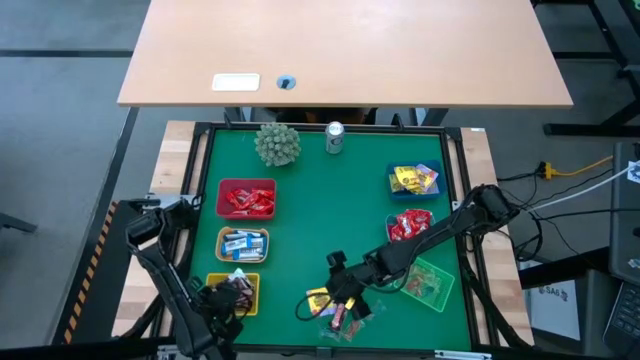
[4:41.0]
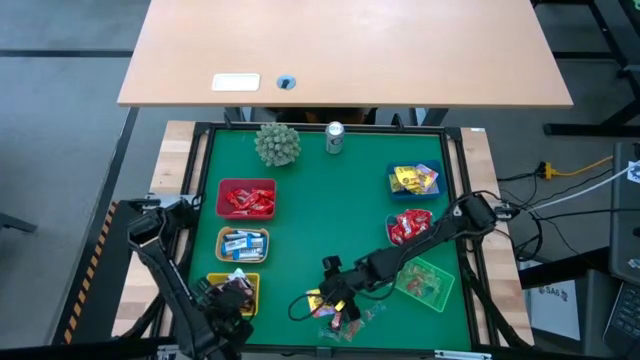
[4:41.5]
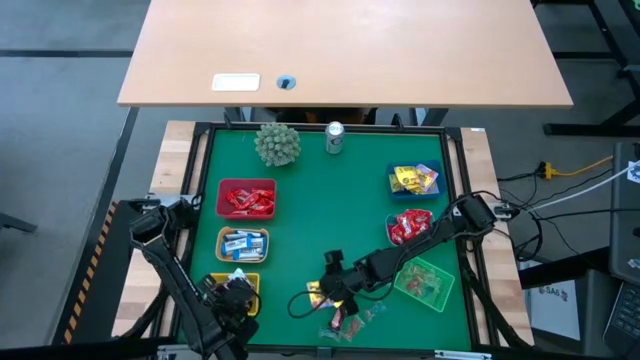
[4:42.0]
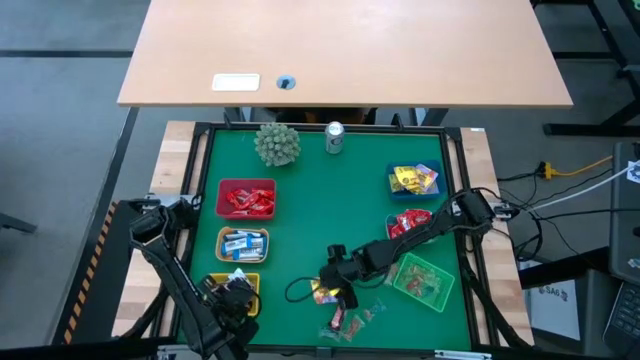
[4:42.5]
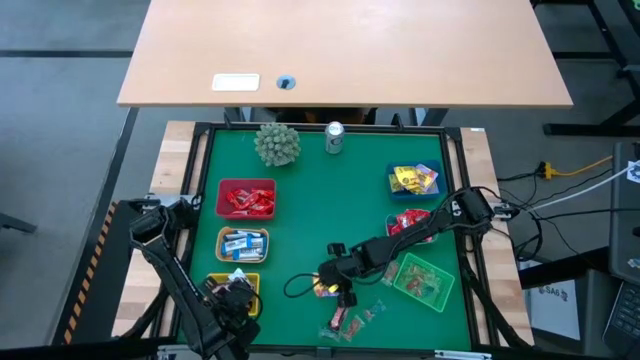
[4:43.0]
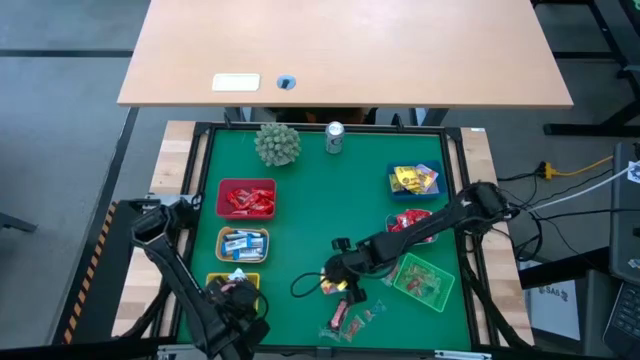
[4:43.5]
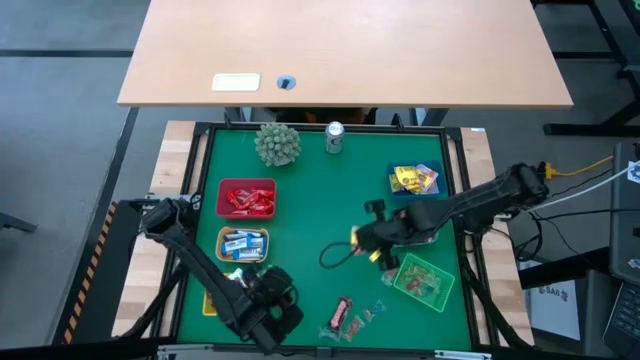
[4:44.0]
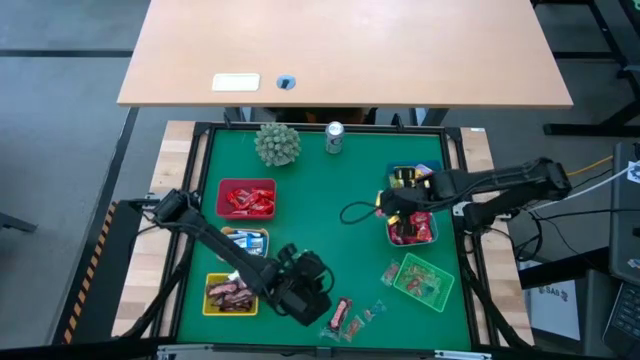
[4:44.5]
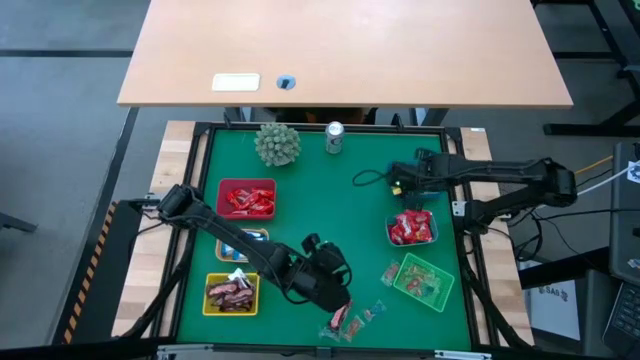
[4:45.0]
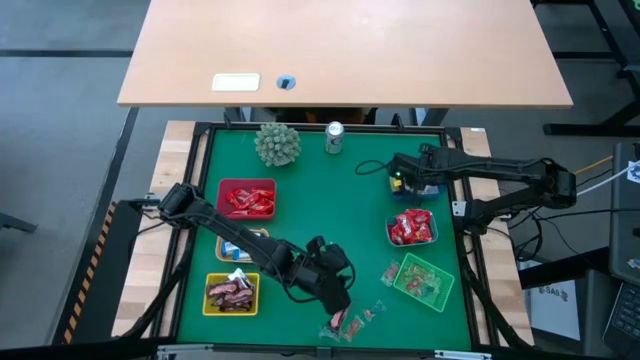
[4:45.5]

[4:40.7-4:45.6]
Task: Sort candy
Put the yellow candy into the dark blue bin

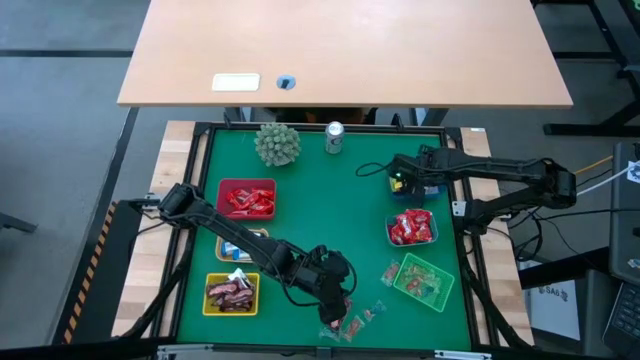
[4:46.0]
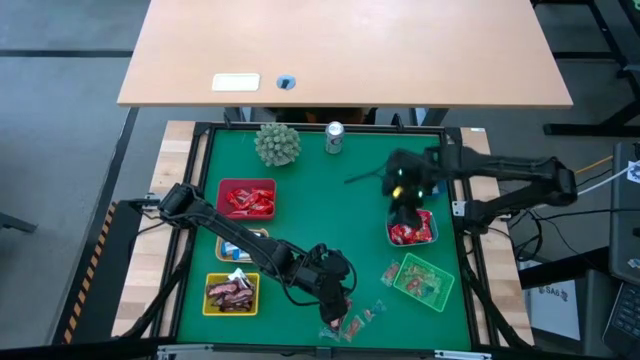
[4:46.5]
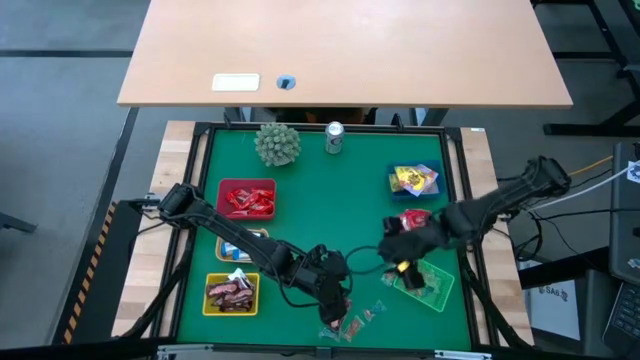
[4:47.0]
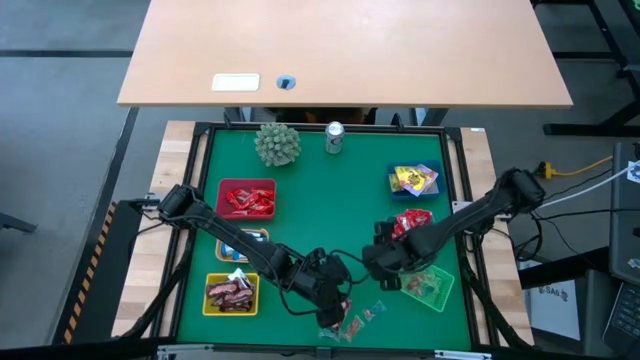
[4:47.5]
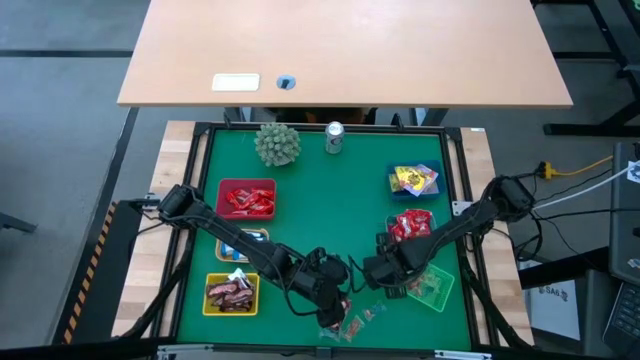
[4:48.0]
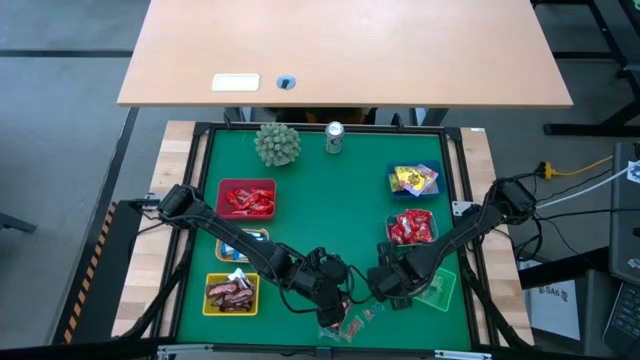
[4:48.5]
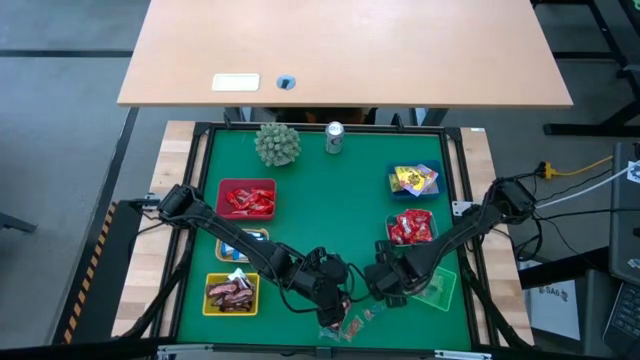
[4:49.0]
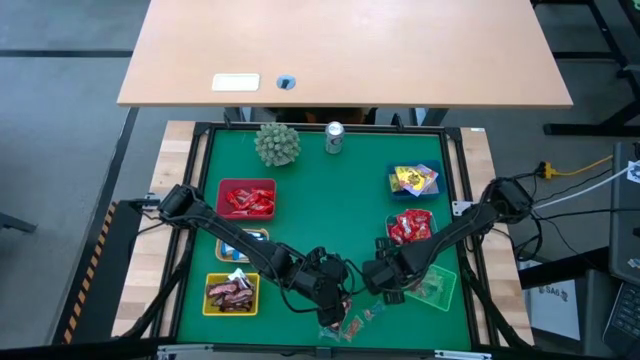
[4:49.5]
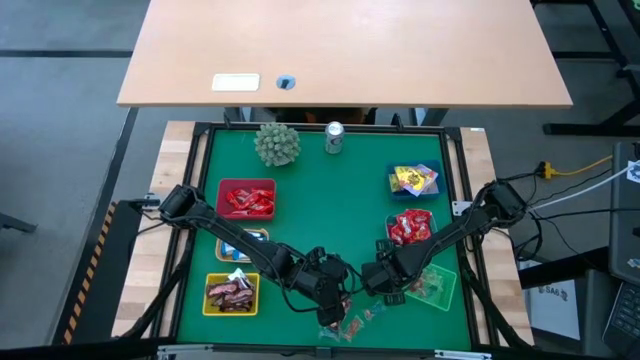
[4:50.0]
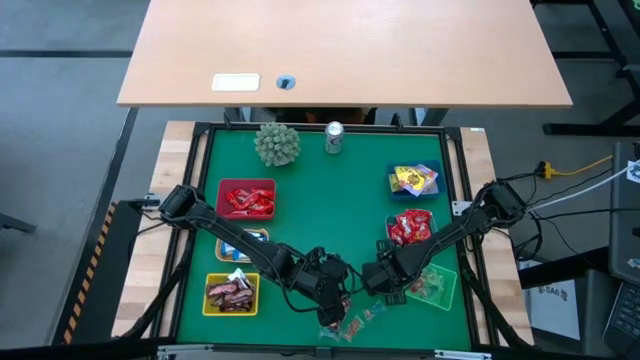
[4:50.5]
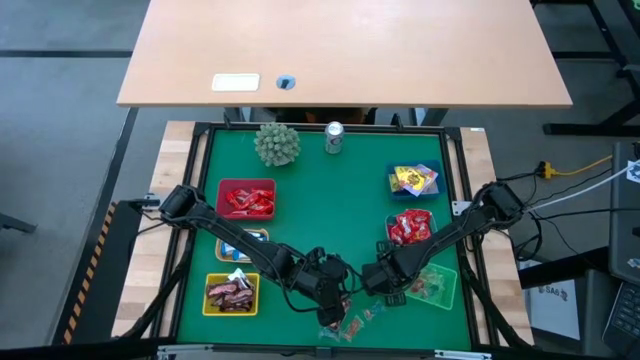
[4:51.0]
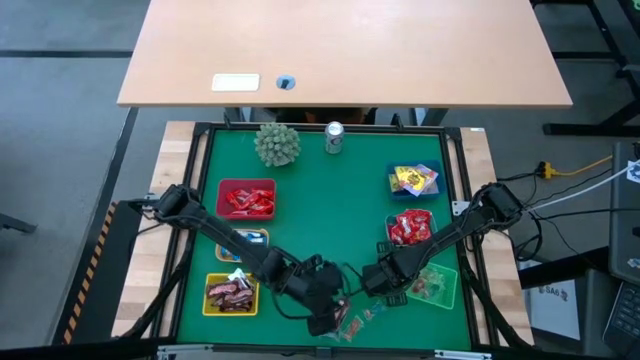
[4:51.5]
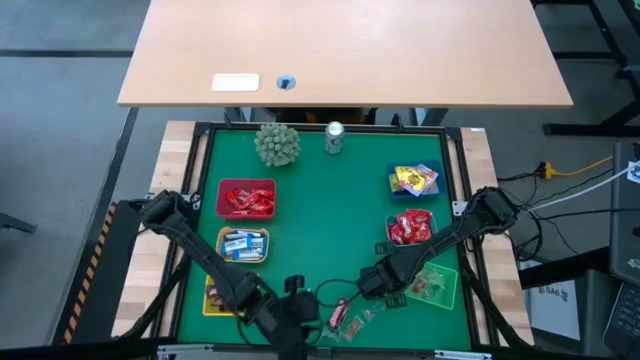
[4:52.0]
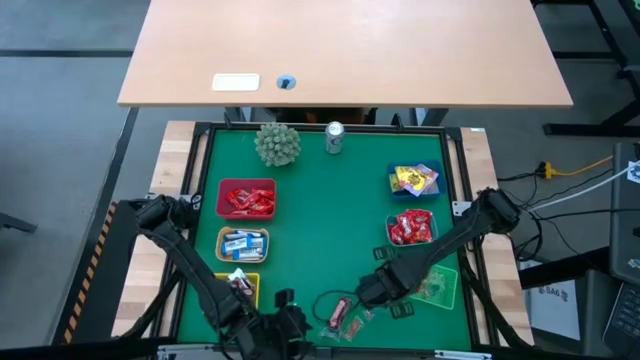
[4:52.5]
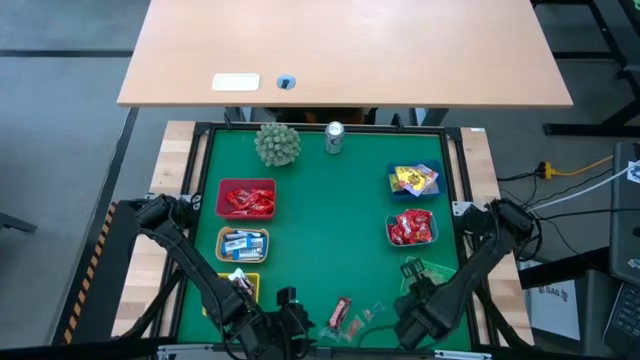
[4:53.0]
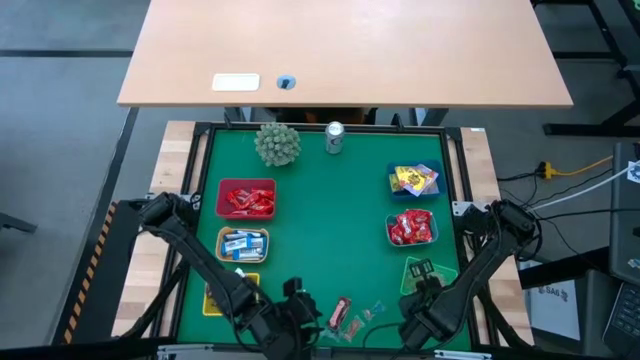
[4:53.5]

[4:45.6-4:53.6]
Put the orange gummy into the green bin

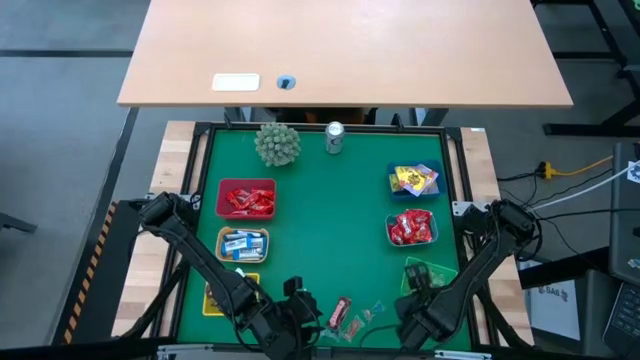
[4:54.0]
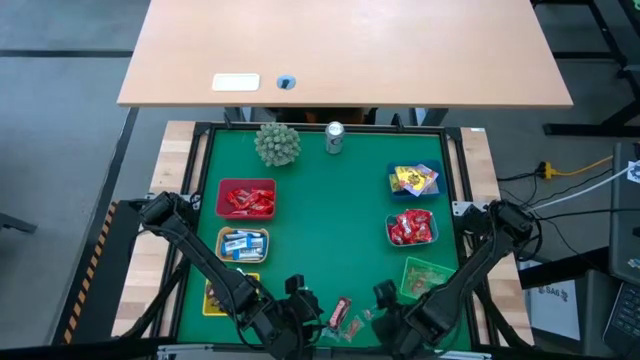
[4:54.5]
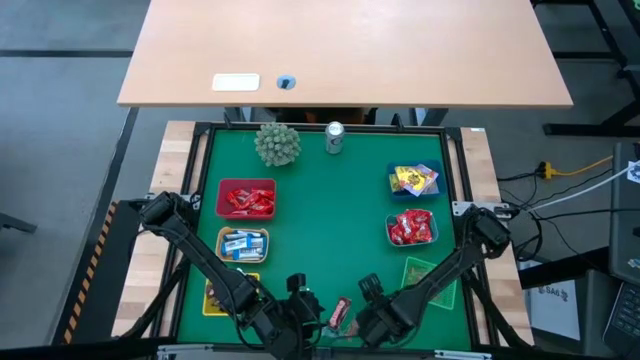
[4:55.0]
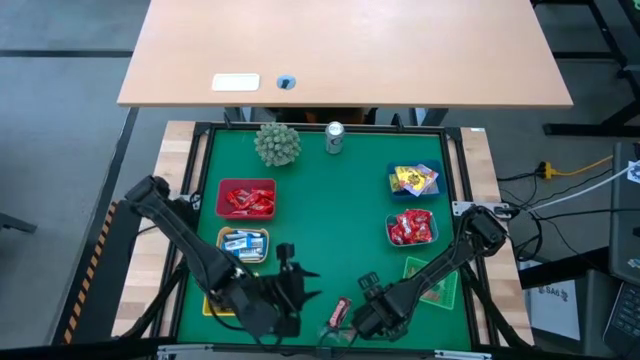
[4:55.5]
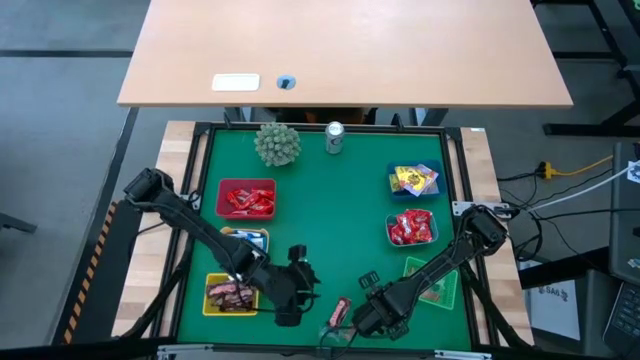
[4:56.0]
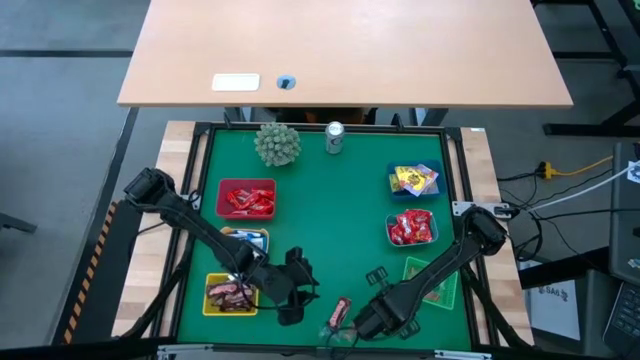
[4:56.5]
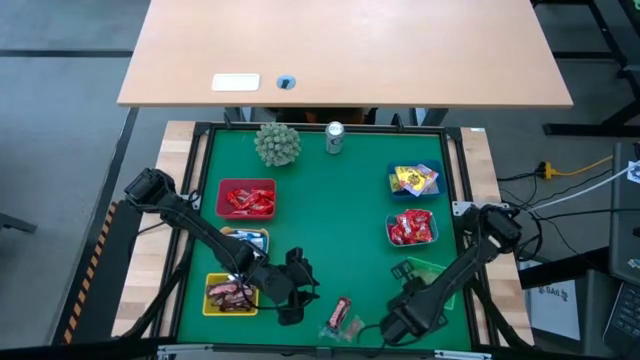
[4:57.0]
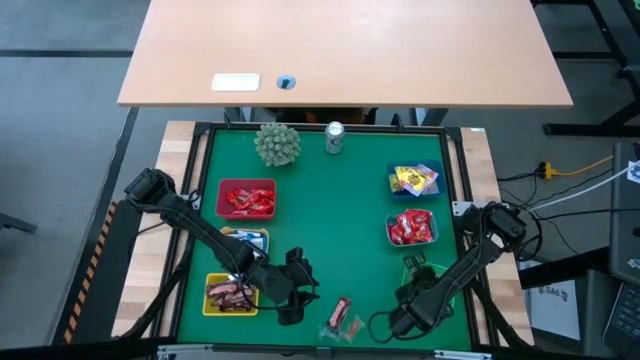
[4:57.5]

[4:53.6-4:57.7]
Put the blue gummy into the green bin

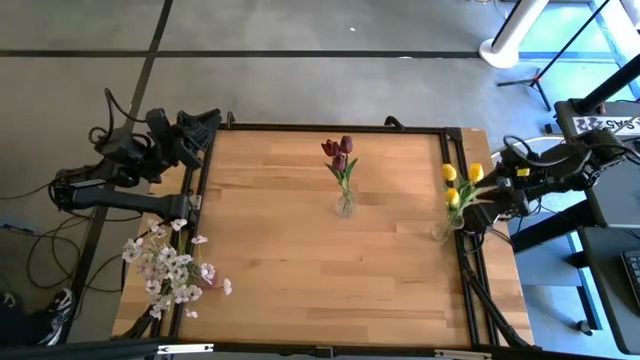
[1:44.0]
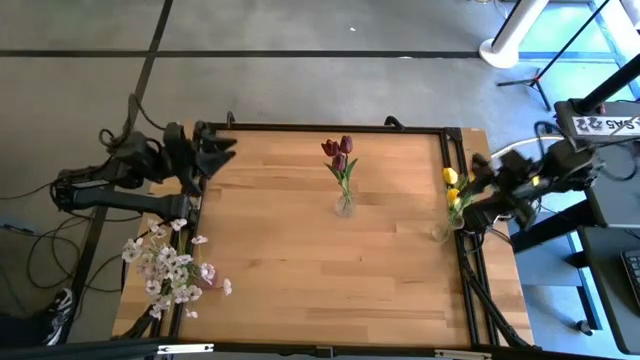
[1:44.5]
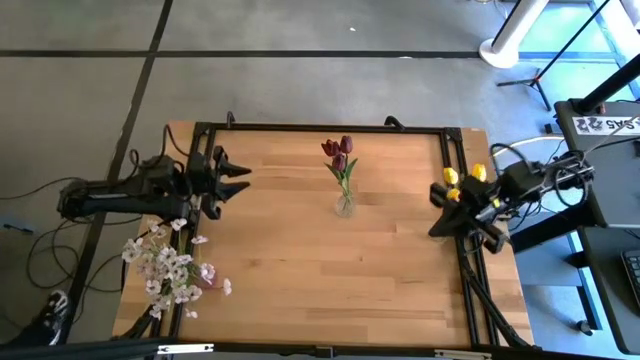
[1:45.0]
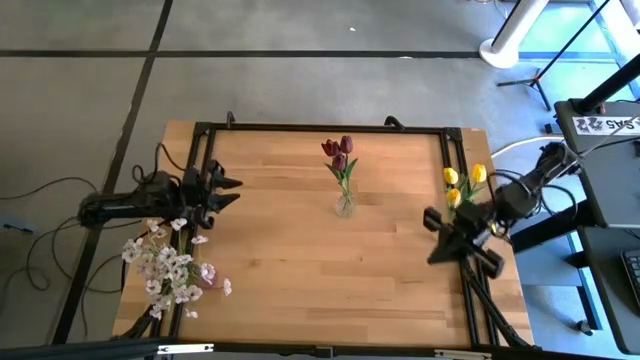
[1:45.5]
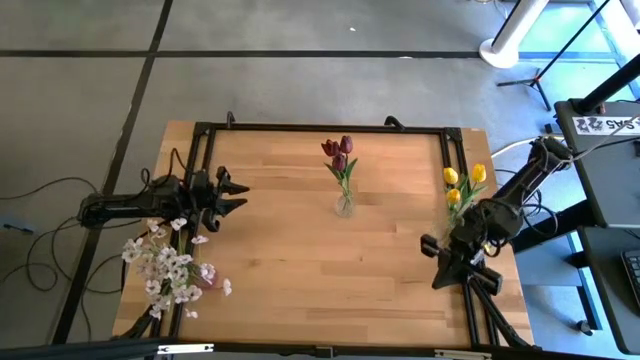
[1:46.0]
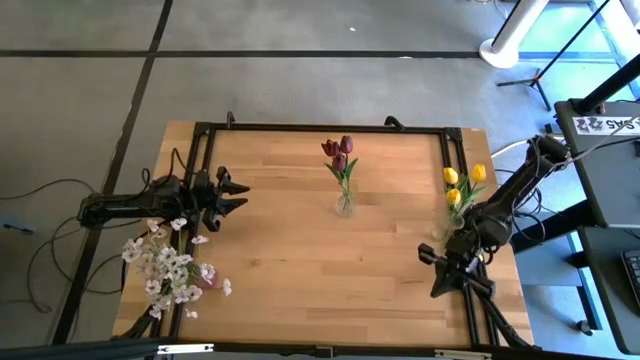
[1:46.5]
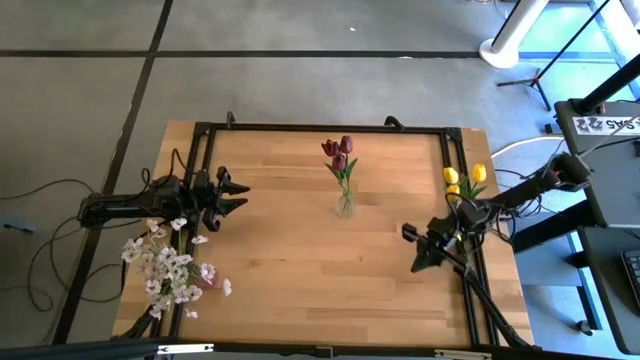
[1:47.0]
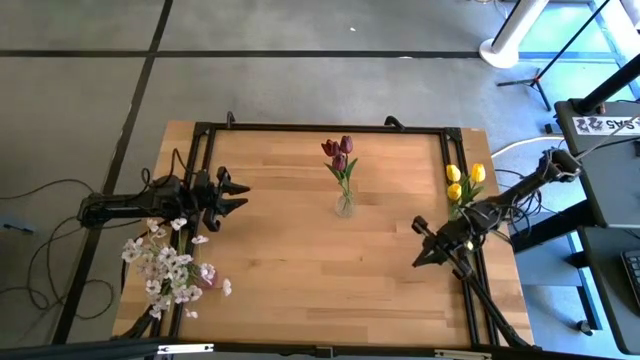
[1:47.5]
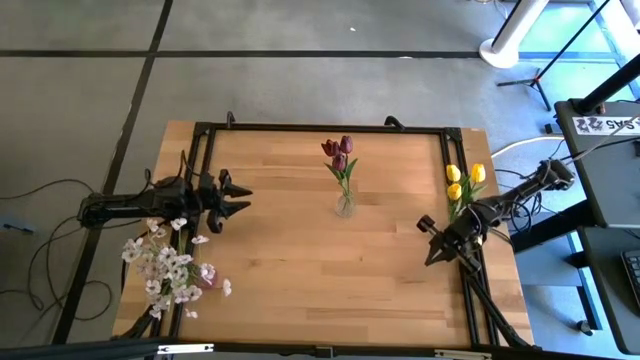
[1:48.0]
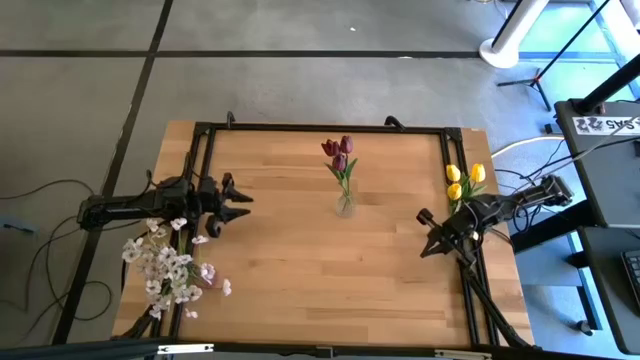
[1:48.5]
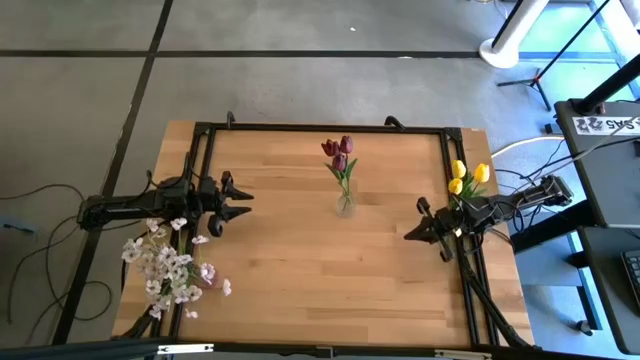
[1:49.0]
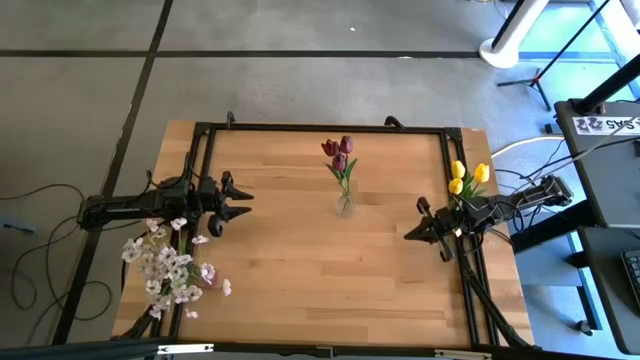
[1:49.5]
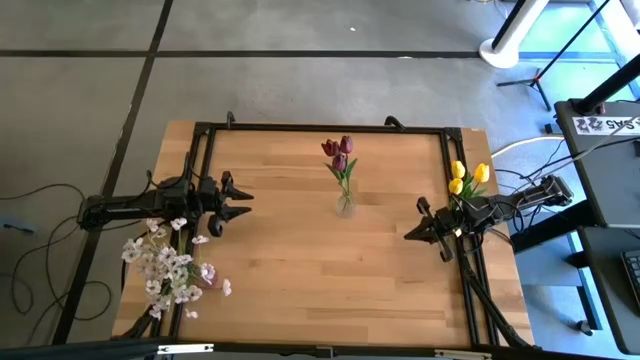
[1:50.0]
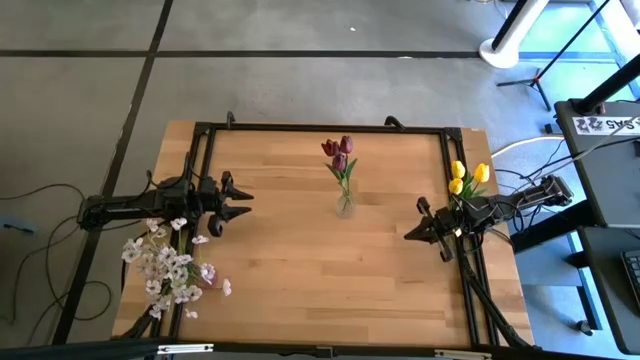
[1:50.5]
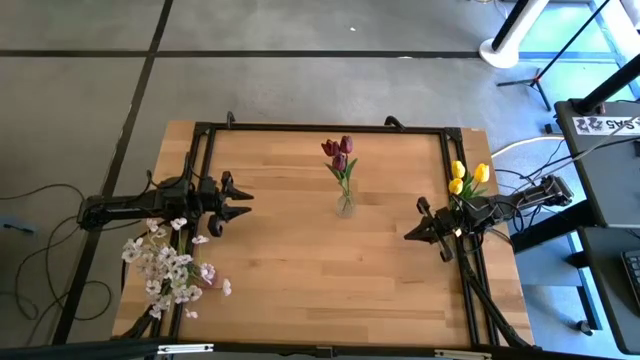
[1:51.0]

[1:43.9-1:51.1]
Task: Sort flowers into vase by color
Return to Home Position
